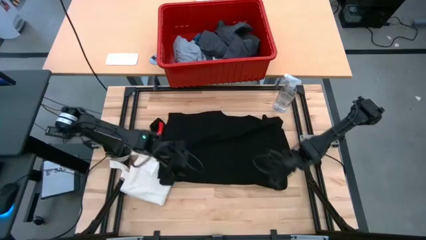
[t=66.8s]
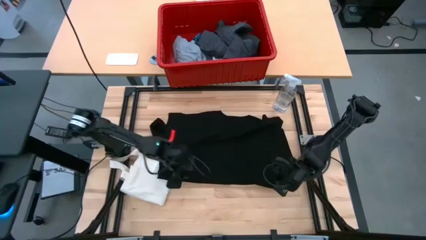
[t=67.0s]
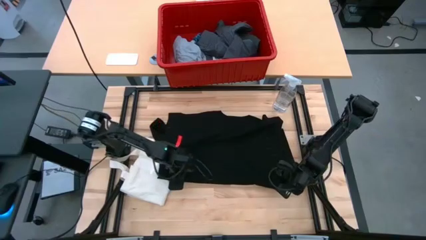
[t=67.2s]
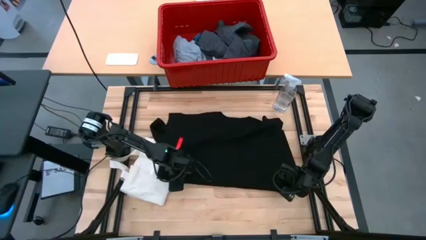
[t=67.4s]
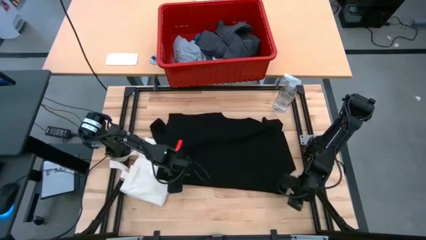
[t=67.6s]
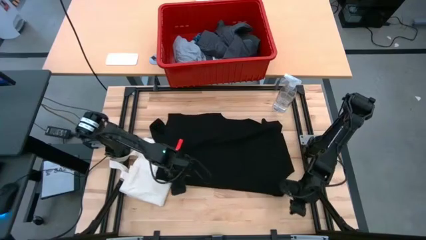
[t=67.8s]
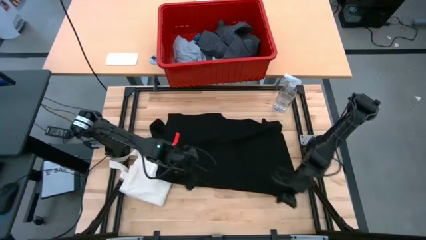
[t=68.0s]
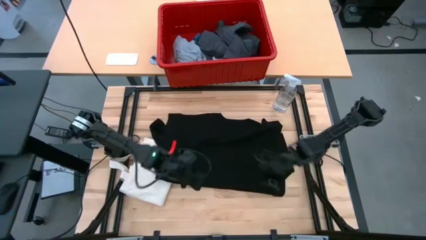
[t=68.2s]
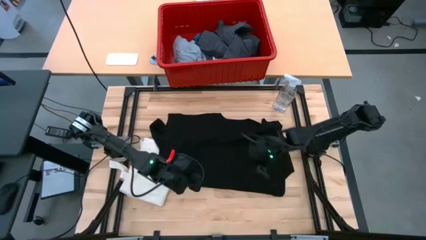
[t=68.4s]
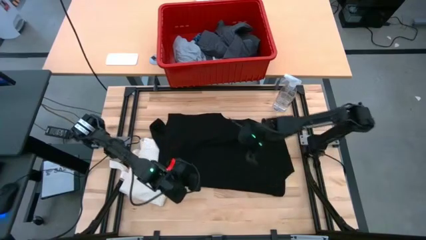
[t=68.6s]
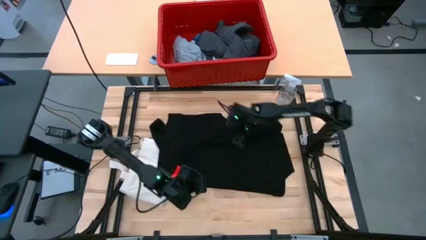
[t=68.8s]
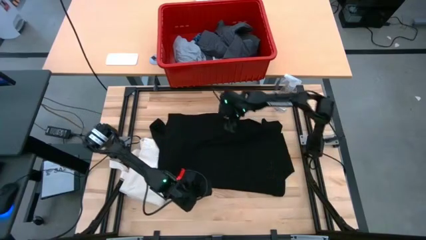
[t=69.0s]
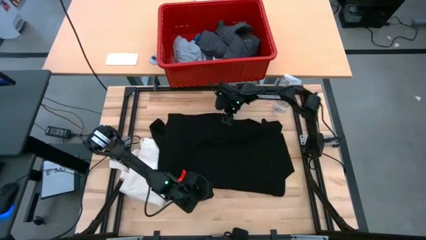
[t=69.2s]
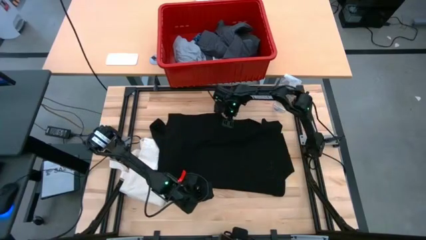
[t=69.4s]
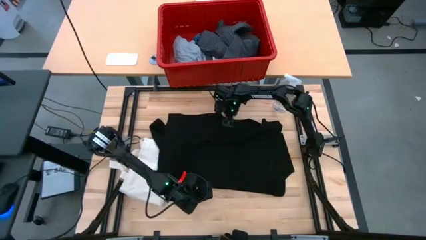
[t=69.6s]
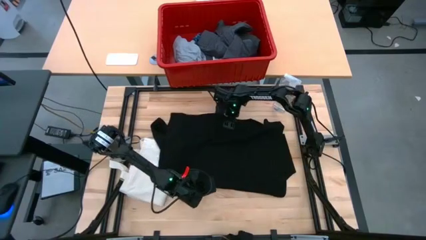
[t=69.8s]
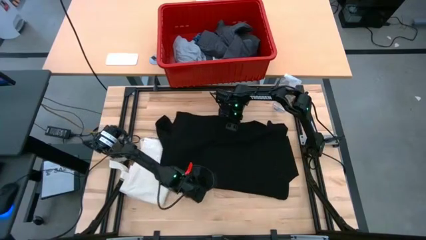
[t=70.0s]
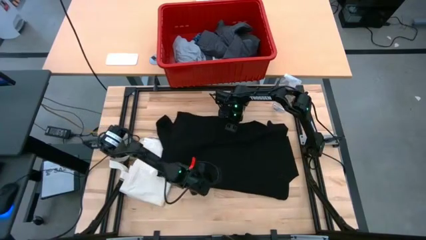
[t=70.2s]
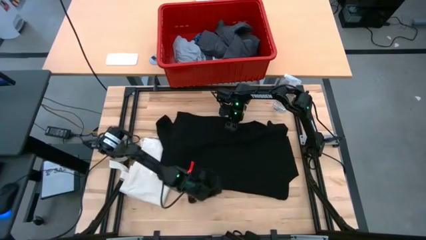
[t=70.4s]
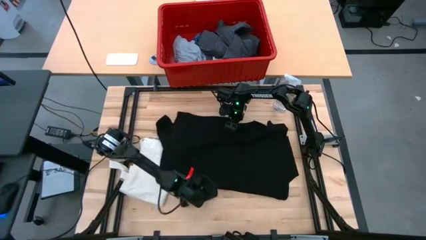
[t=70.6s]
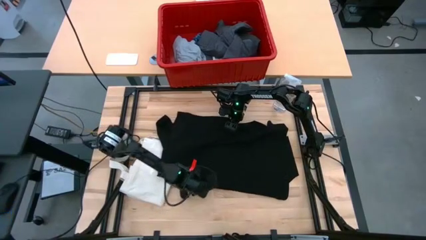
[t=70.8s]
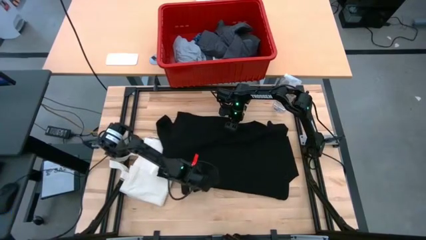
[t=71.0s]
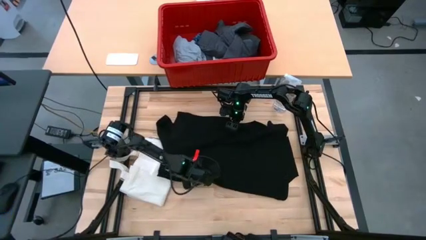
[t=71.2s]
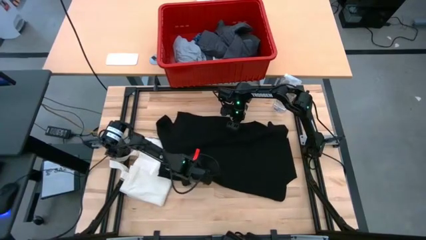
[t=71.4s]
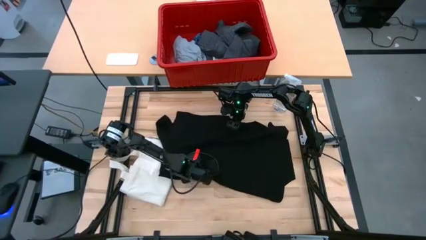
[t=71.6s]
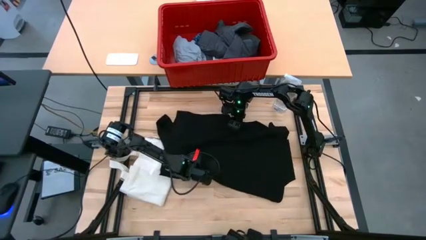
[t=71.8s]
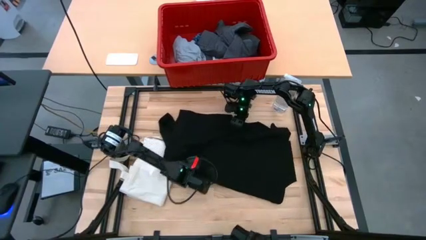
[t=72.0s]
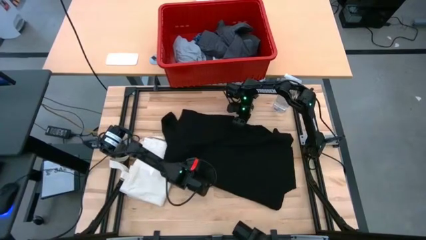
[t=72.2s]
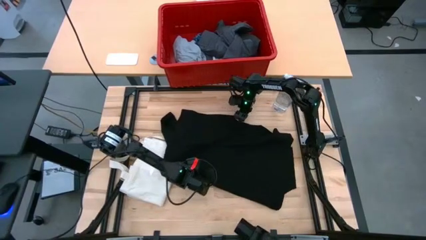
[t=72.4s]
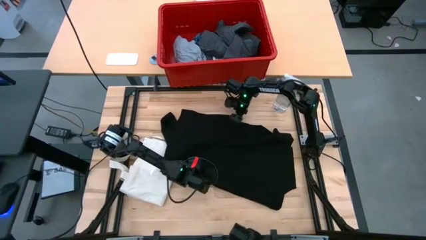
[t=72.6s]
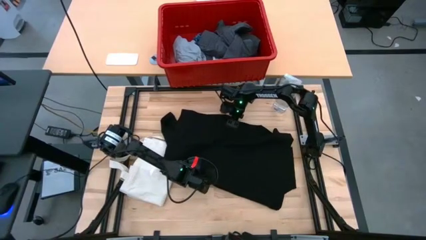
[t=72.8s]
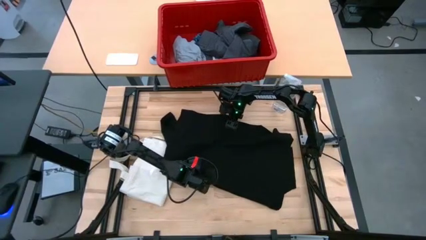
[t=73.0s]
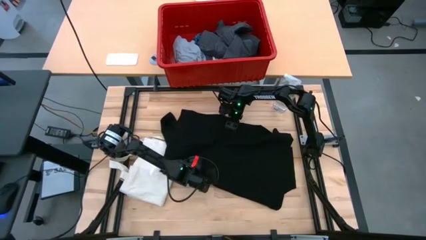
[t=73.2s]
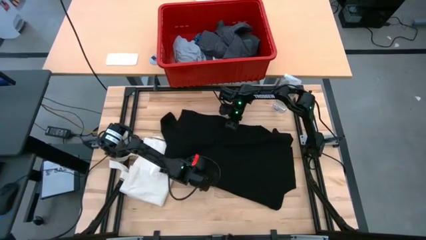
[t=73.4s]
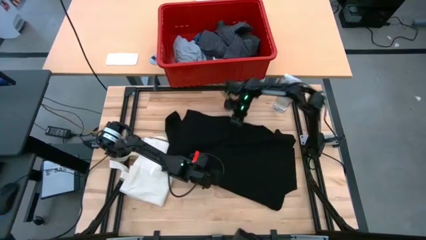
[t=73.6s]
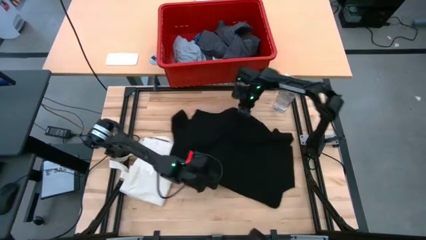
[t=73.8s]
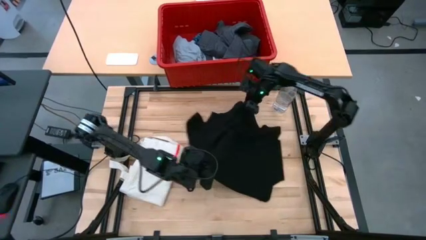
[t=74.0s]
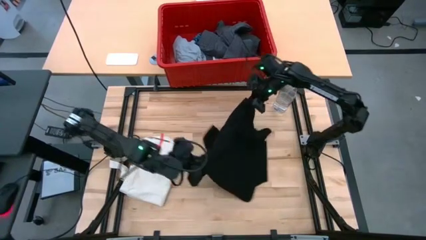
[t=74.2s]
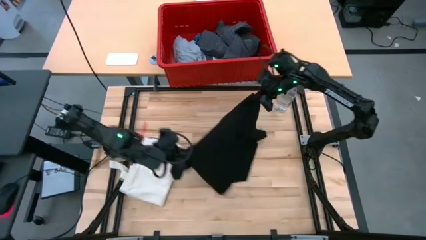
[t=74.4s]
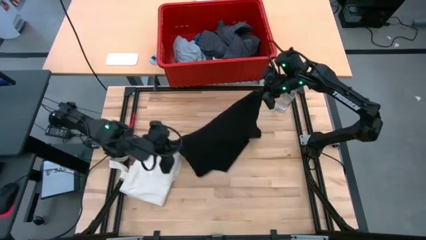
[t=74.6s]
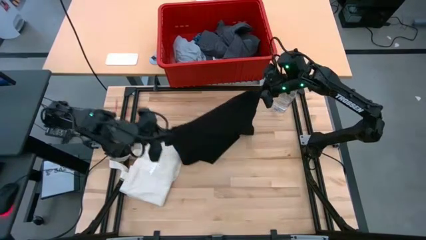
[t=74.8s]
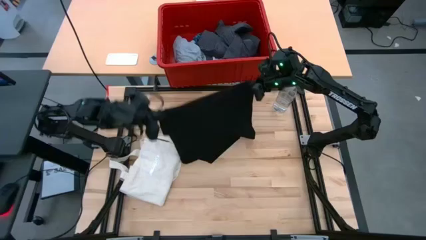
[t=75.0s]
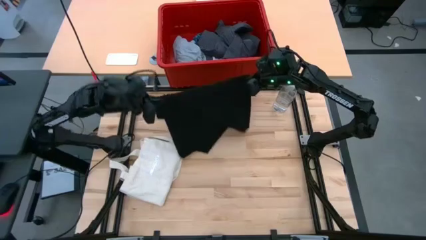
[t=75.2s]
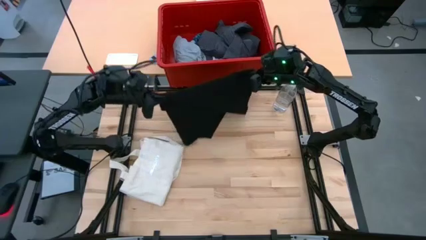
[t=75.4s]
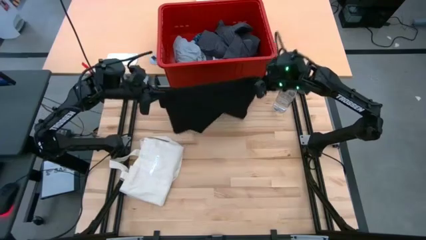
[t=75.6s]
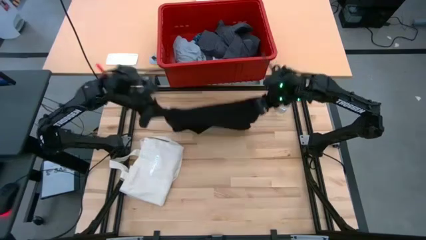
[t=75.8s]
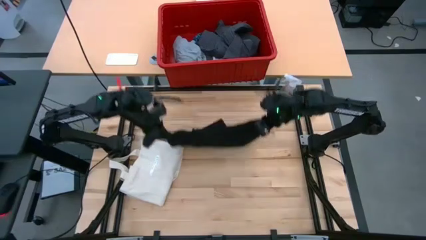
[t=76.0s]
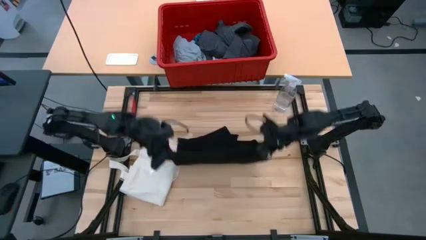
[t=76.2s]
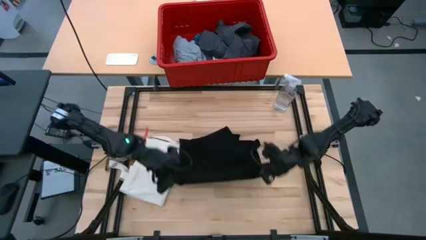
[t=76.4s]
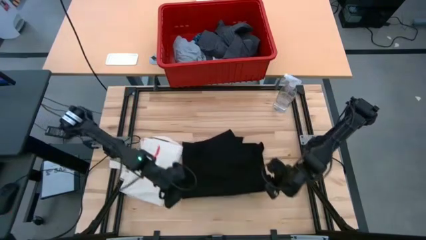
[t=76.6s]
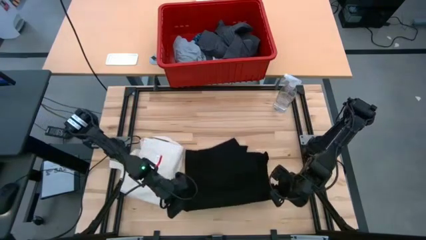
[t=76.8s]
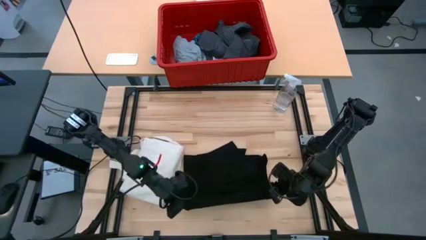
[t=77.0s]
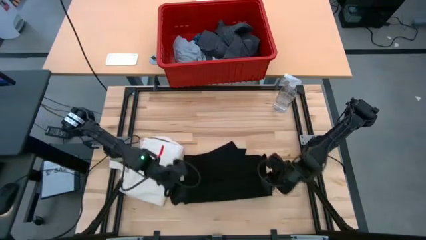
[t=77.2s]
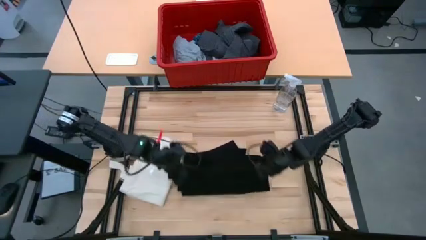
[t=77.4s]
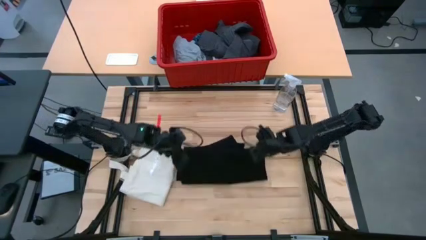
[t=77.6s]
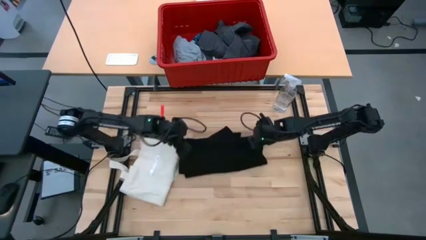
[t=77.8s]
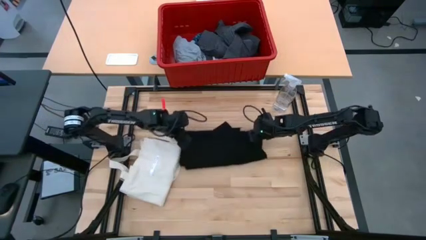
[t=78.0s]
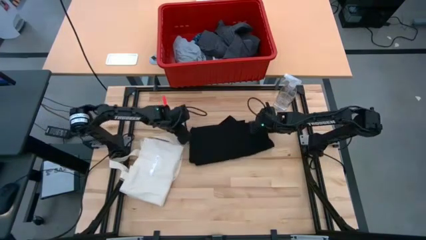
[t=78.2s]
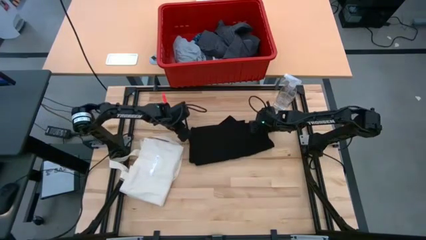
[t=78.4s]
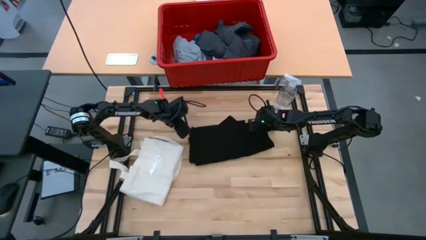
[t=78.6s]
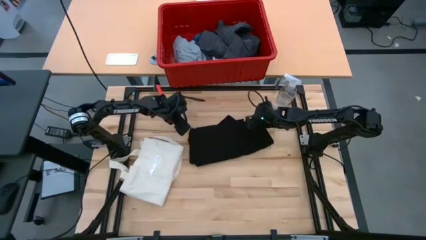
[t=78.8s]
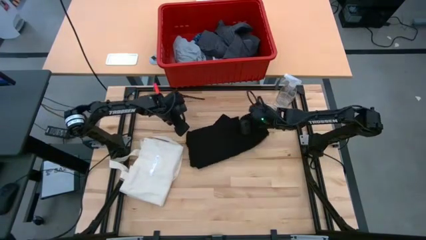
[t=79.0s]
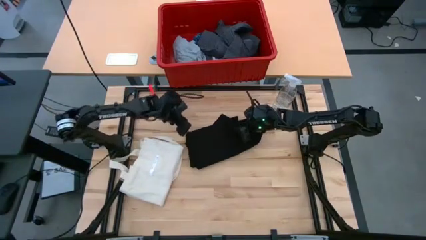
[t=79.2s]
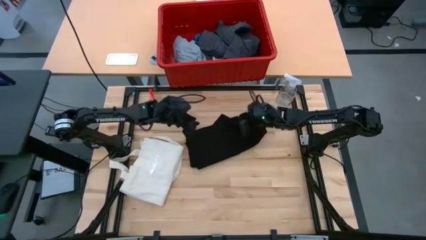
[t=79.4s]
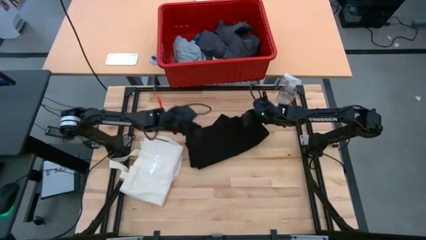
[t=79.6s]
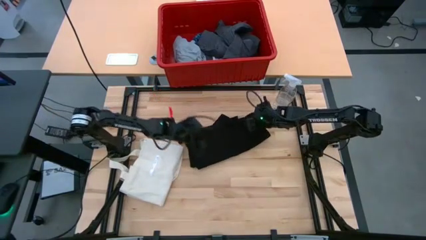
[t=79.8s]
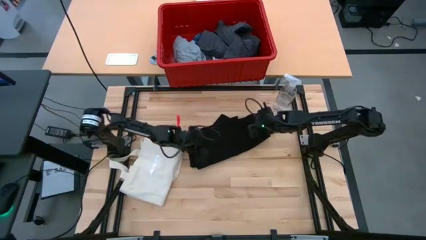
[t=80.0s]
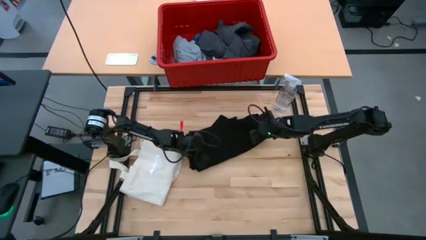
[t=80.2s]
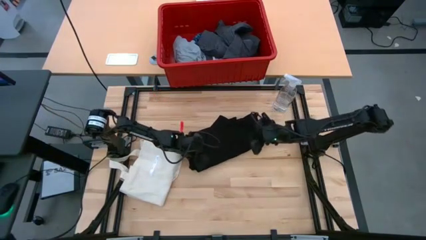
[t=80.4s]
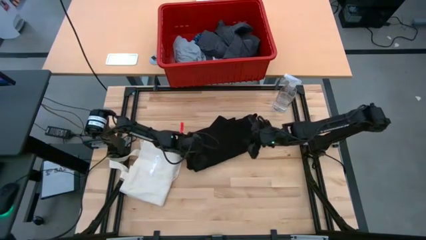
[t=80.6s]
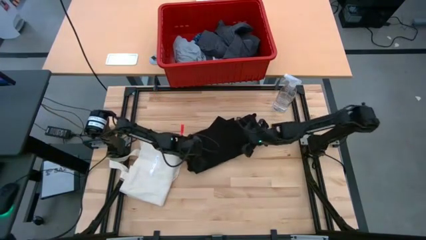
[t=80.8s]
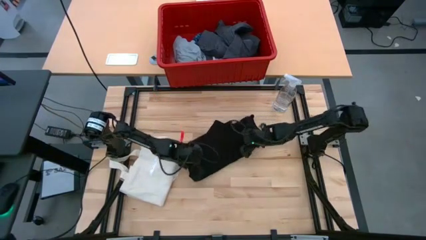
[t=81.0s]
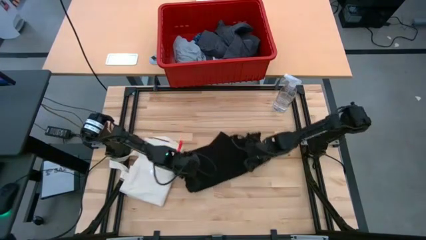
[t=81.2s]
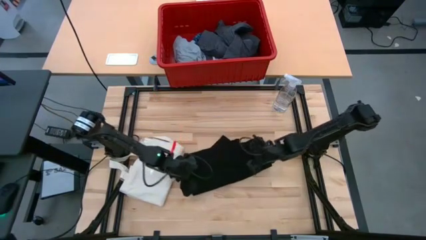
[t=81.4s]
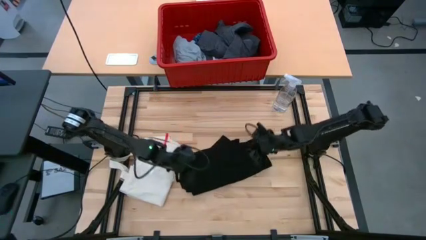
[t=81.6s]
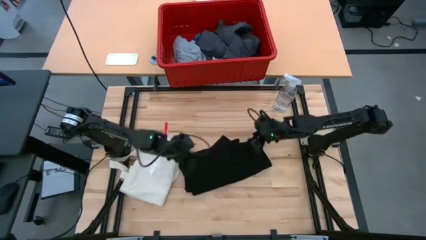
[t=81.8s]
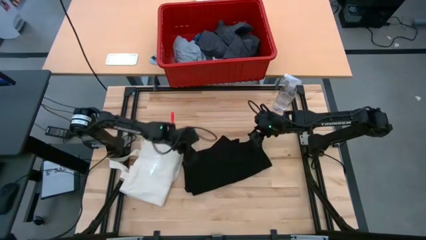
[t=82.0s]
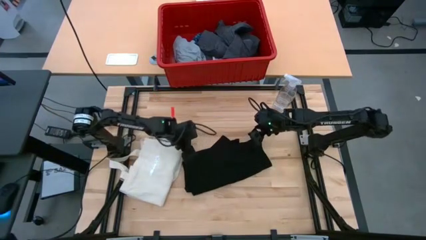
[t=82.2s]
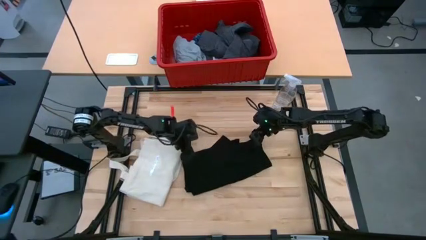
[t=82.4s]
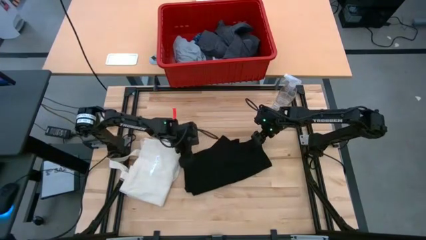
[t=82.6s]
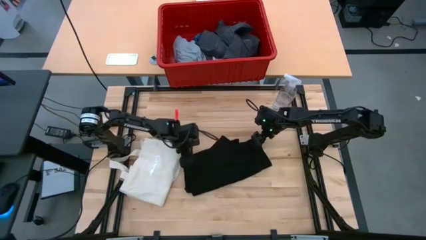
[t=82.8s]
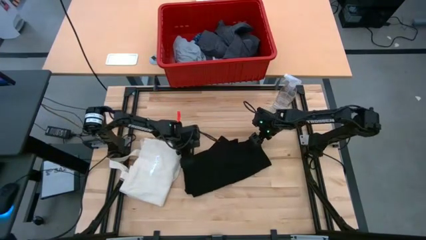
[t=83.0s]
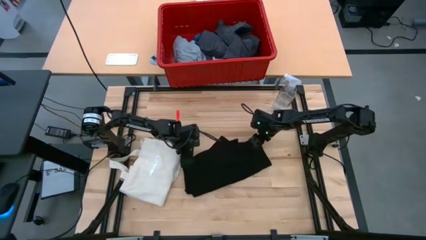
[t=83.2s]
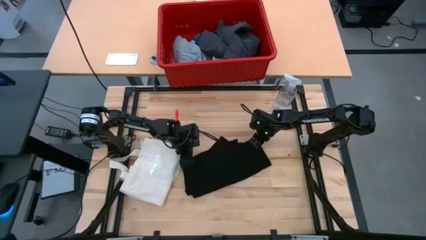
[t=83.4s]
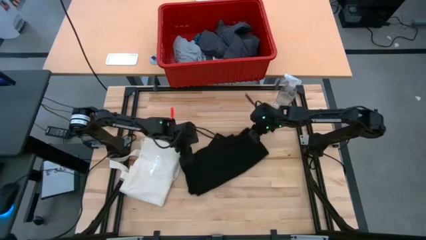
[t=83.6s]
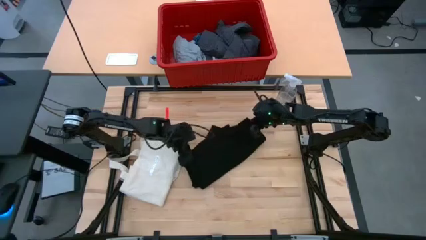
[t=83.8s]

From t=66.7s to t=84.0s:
Task: Fold Laundry from Bin
Fold the black shirt
